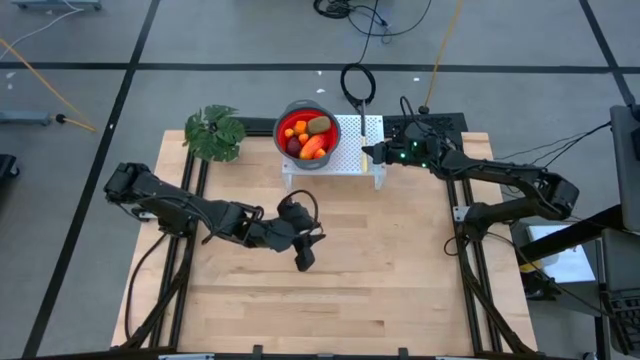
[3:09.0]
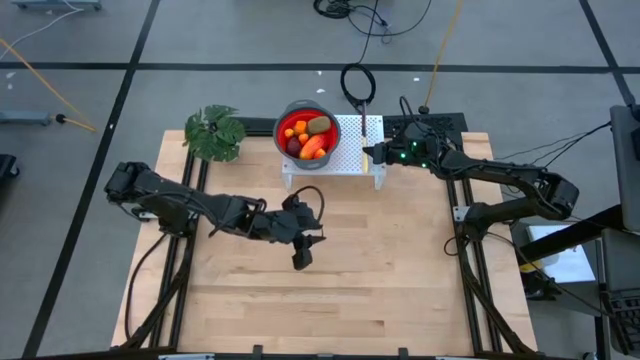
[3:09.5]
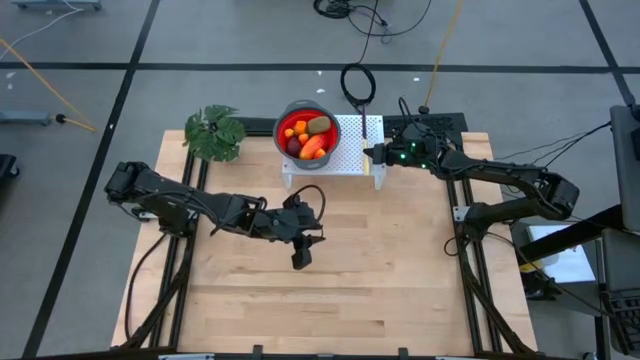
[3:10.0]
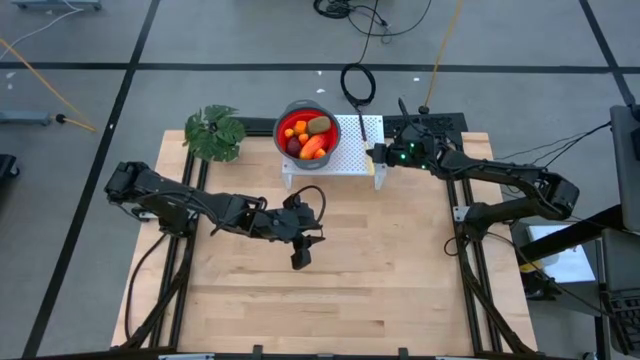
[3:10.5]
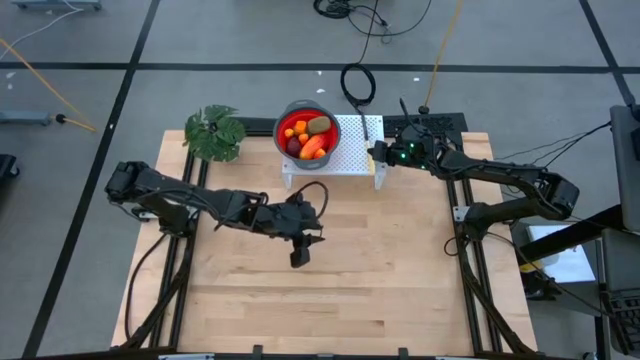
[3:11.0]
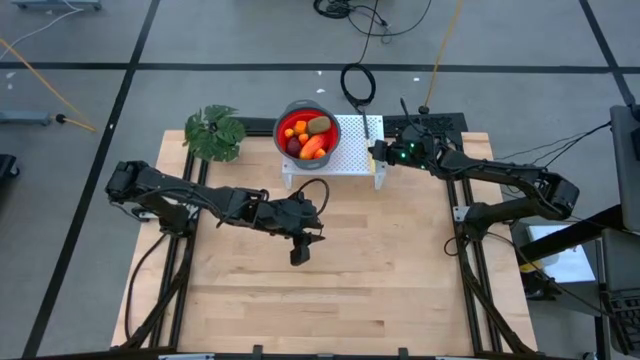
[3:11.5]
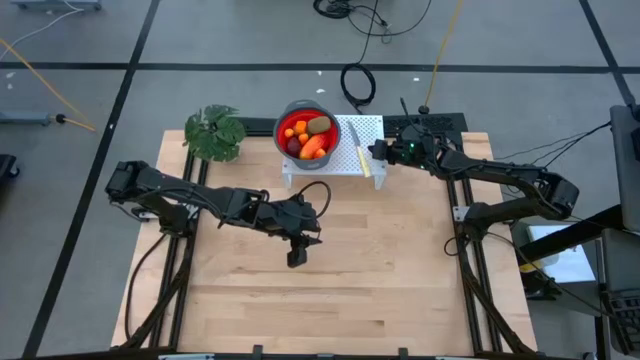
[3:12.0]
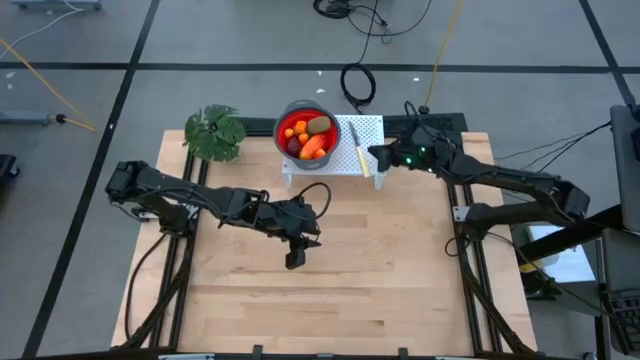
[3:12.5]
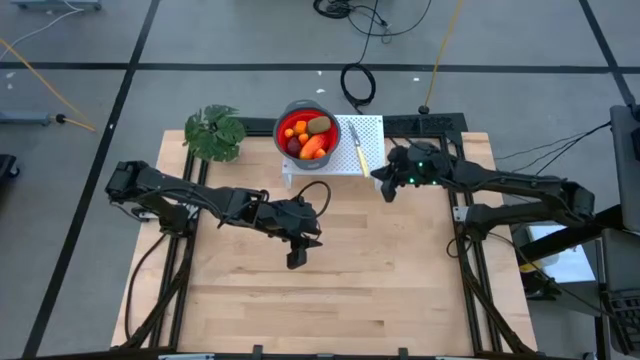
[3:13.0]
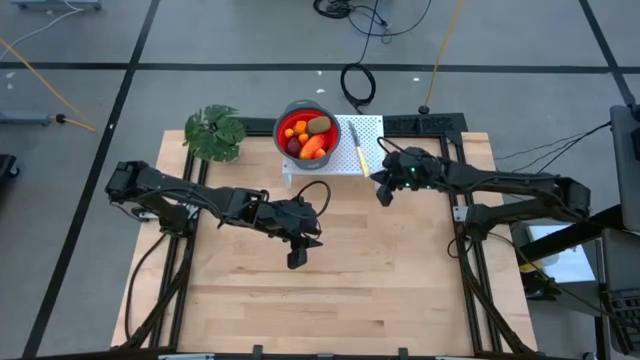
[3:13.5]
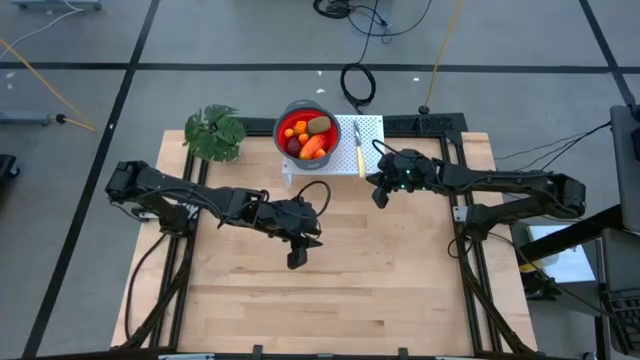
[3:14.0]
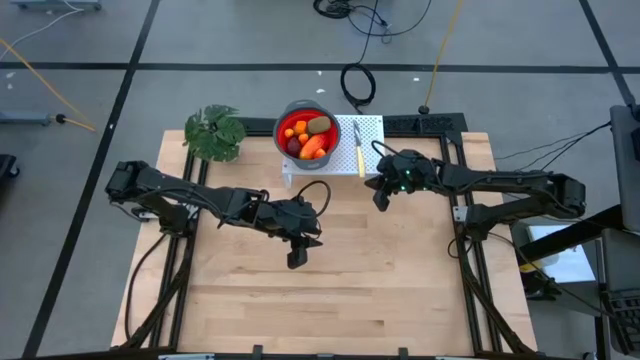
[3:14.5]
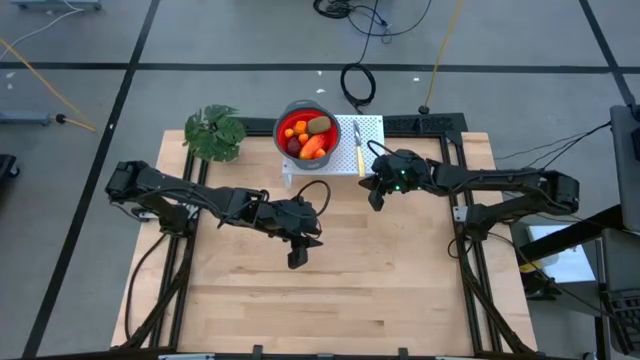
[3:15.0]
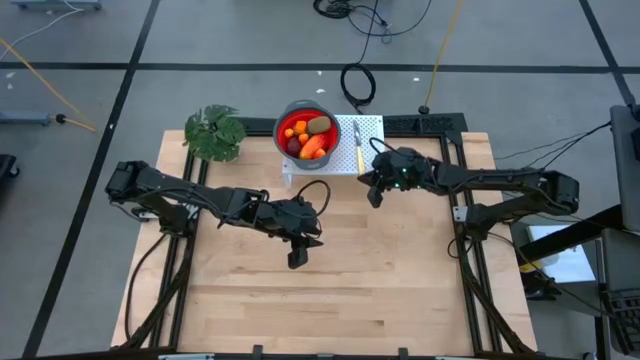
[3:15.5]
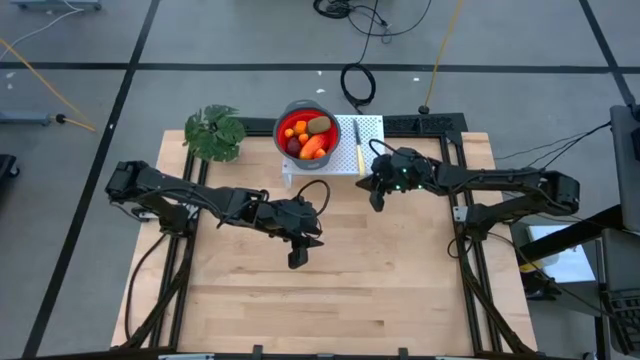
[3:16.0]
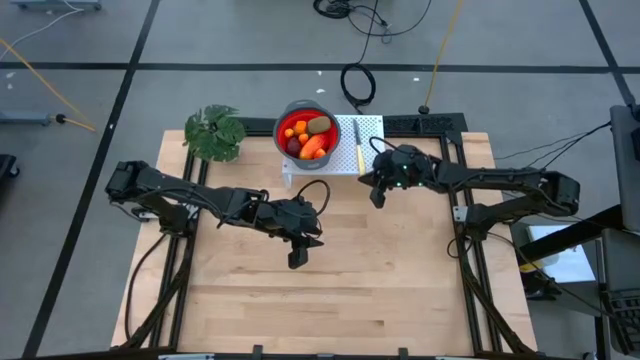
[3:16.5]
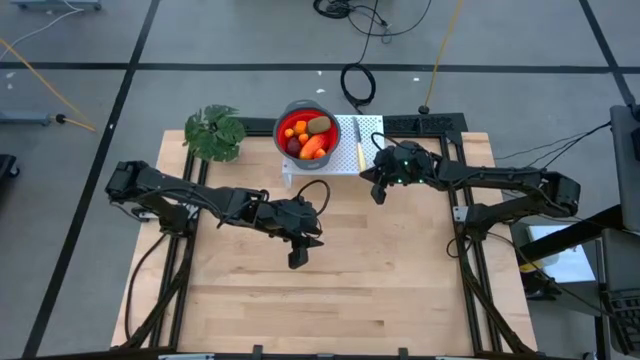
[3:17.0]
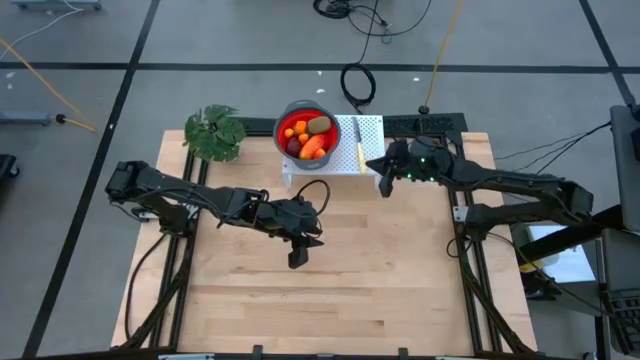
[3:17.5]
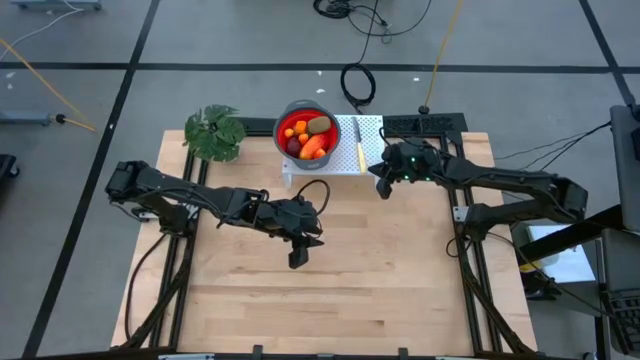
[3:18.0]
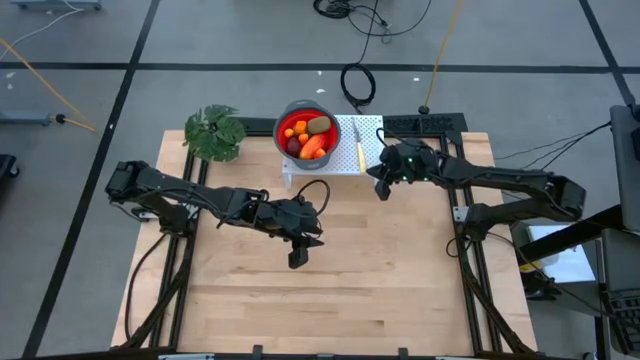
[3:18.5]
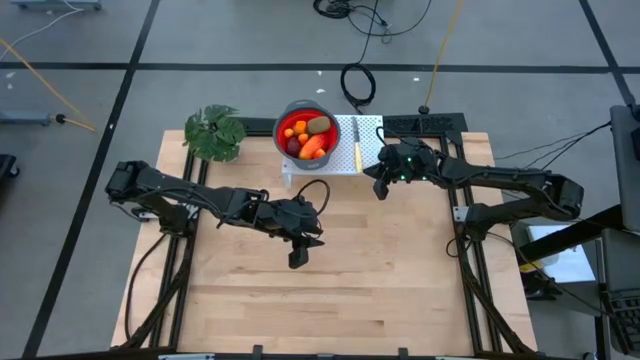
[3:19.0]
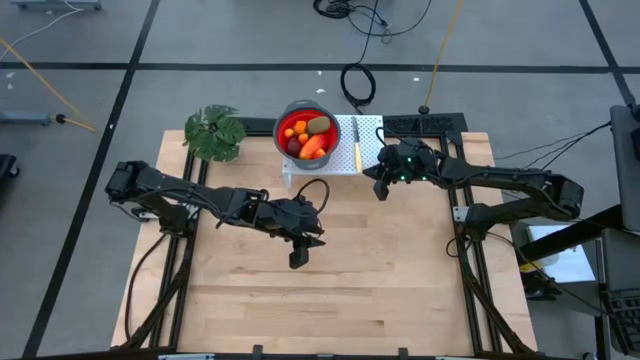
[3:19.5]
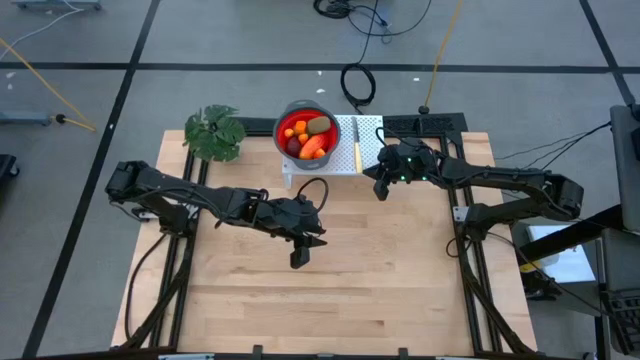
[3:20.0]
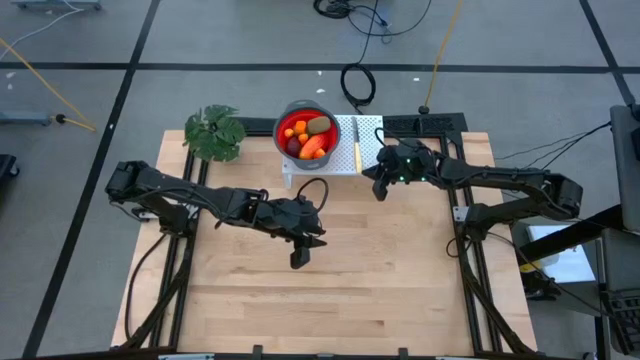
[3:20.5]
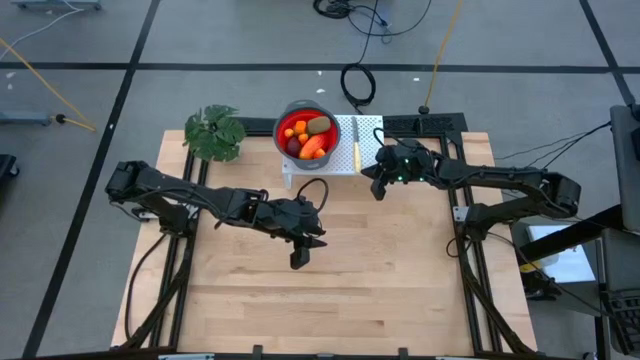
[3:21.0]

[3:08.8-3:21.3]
Task: Pick & Place Fruit
Put the yellow knife on the shelf

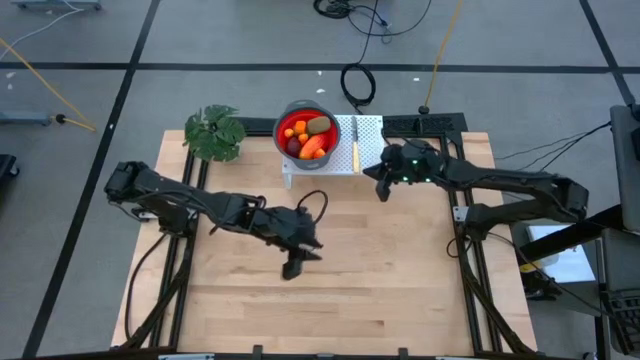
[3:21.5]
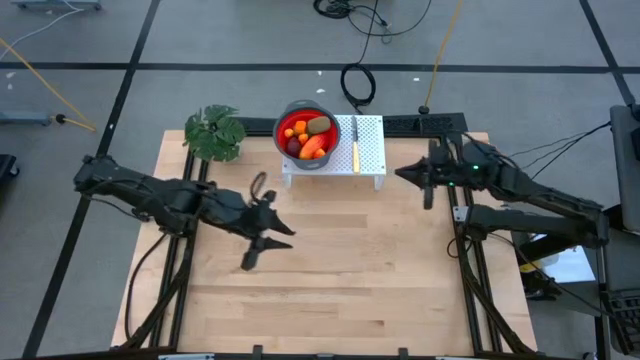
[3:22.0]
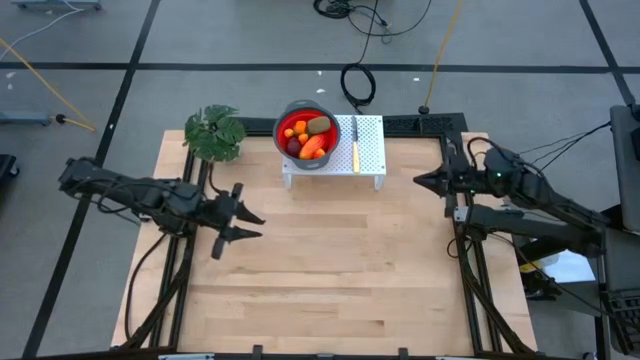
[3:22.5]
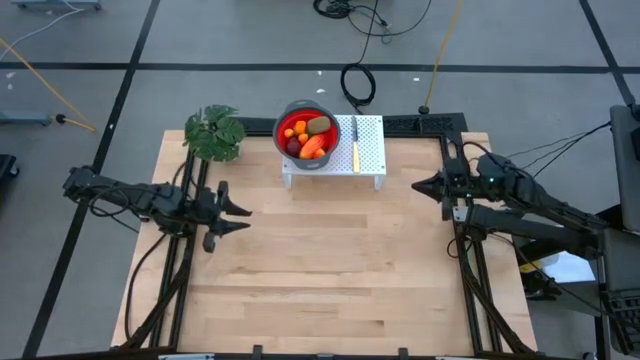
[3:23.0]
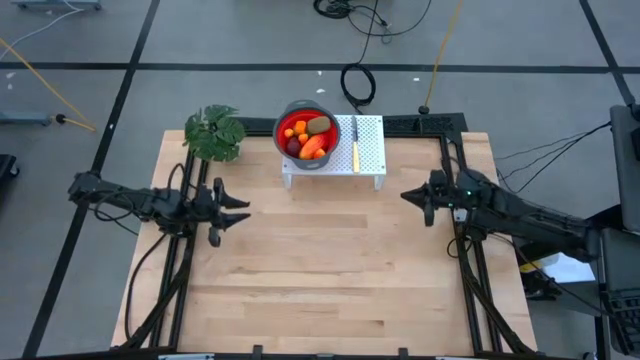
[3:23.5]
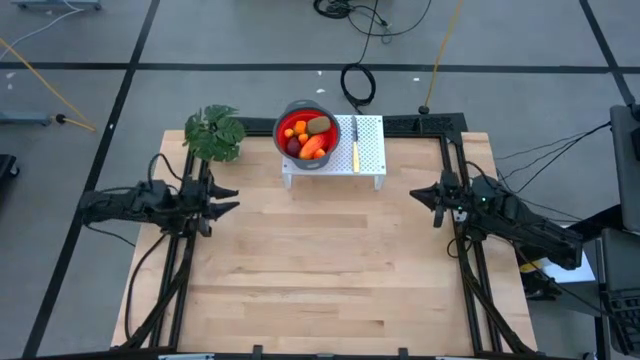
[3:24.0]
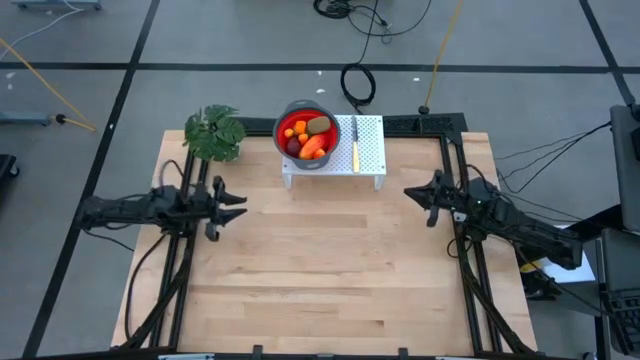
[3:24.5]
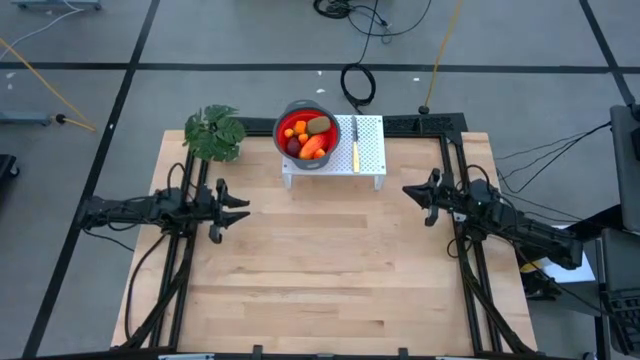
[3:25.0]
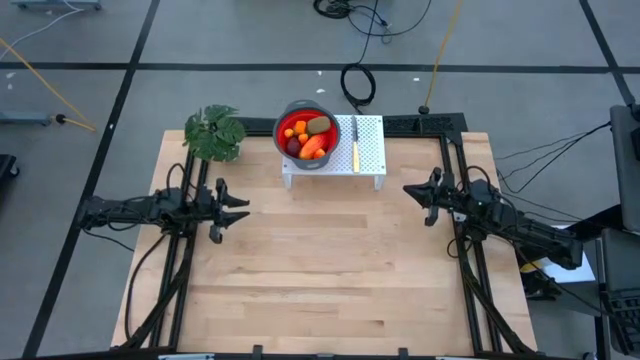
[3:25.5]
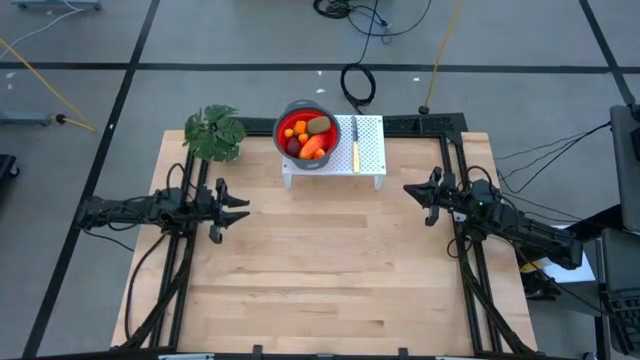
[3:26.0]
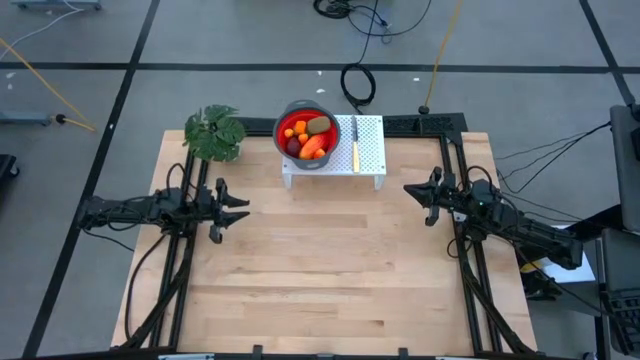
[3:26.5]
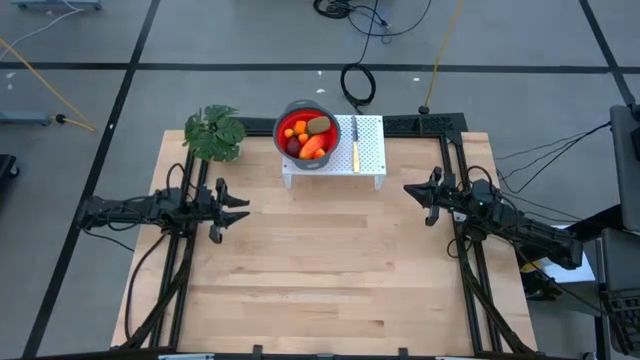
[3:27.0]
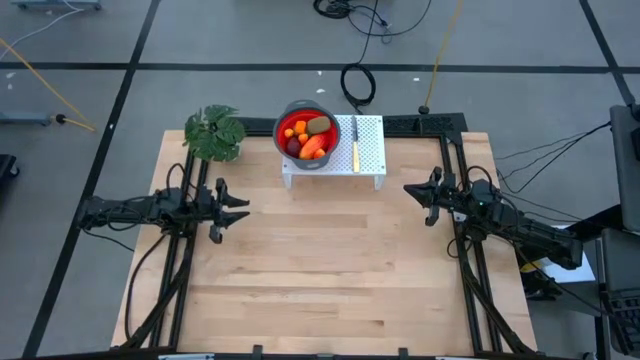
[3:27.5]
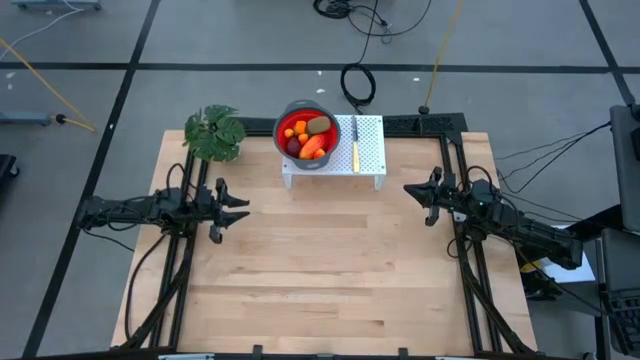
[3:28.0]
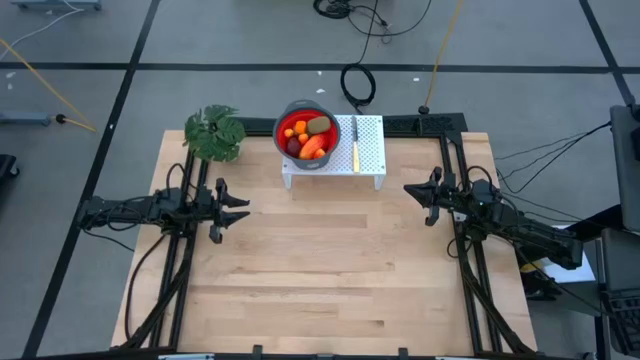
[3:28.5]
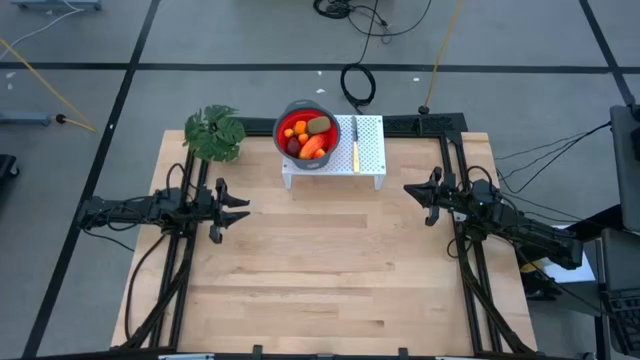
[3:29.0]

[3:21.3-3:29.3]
Return to Home Position
